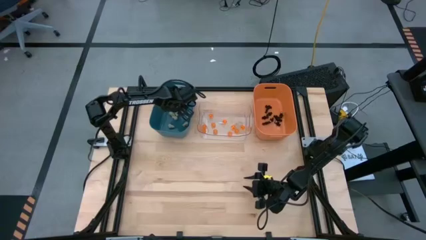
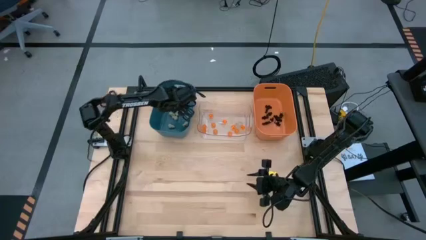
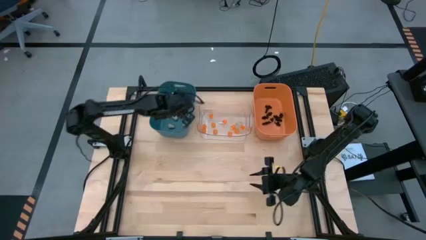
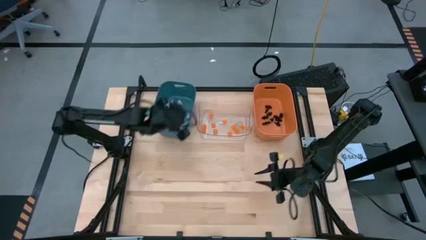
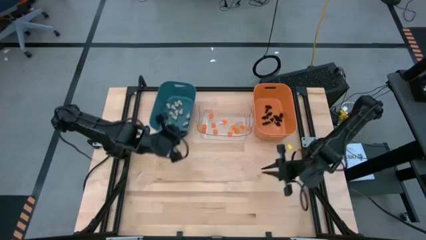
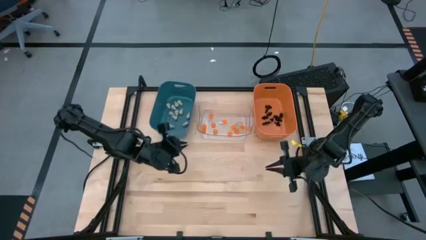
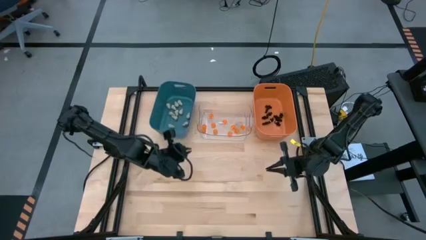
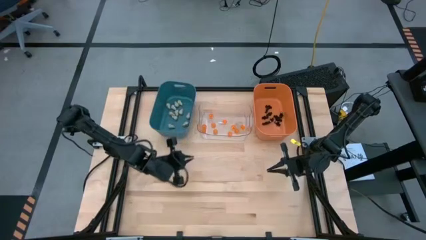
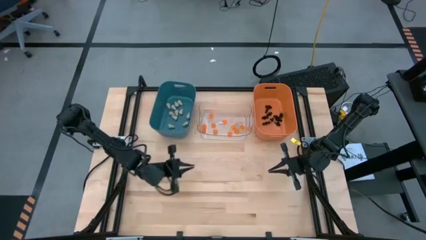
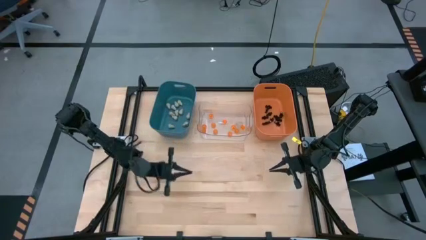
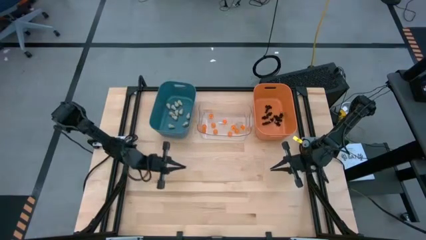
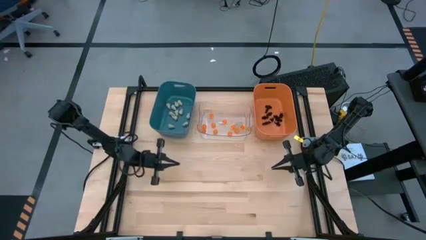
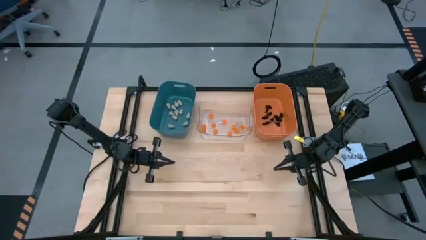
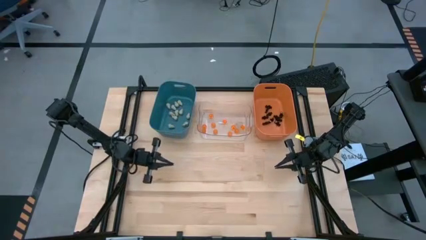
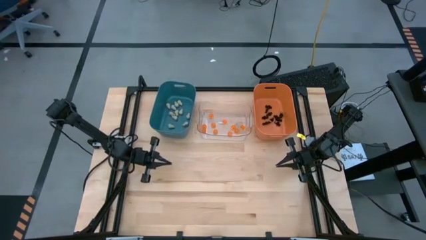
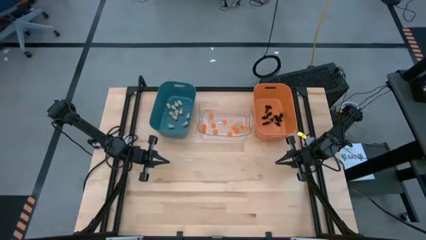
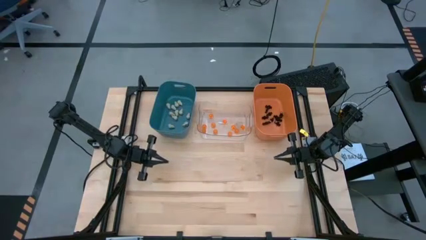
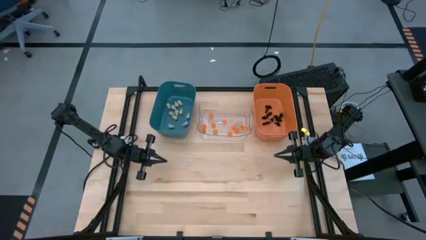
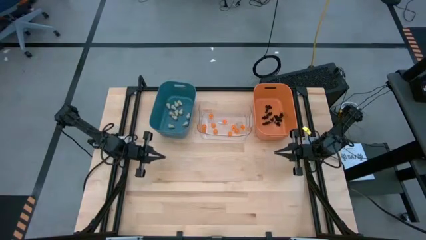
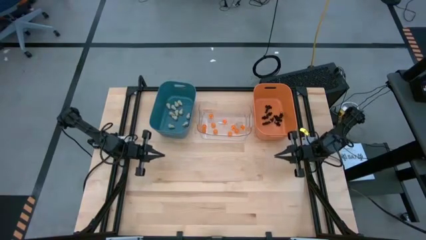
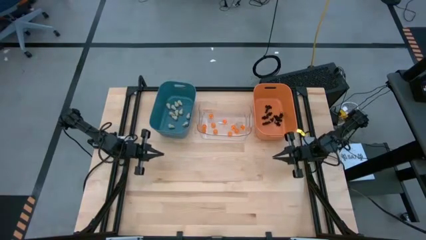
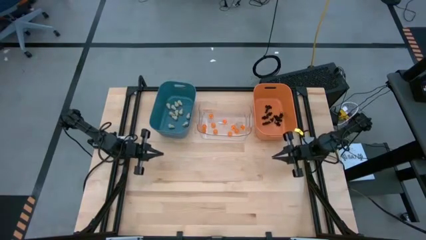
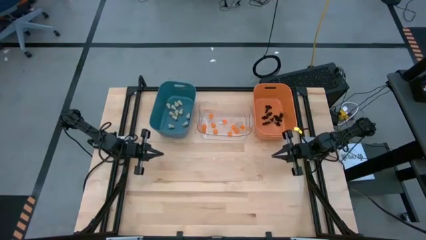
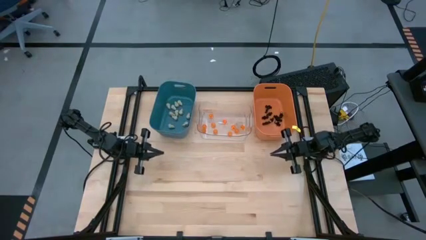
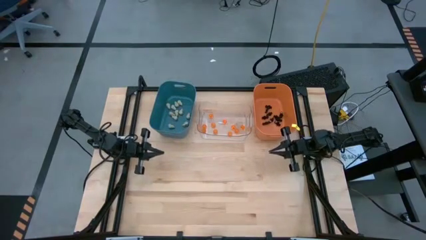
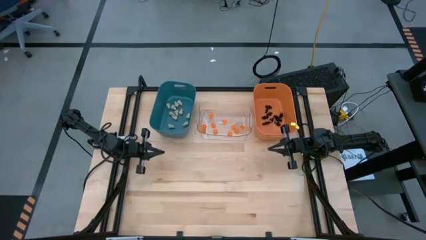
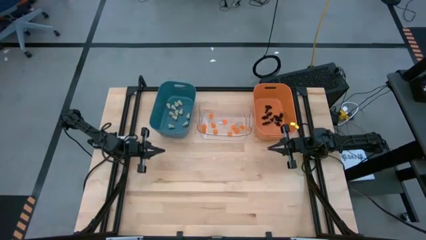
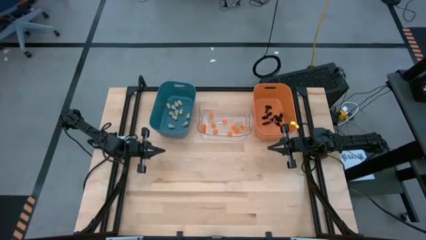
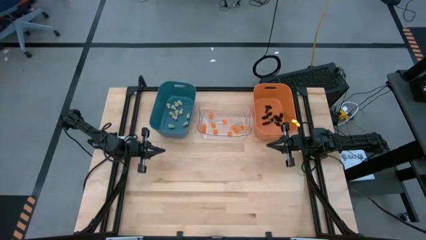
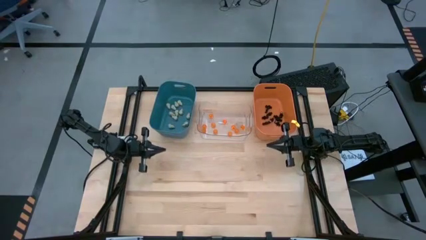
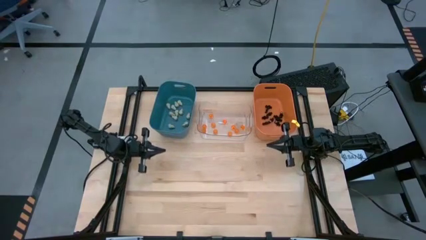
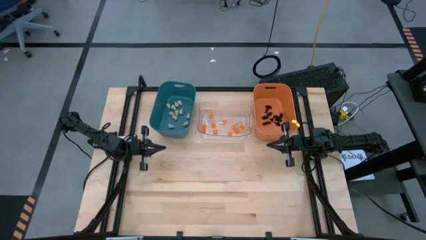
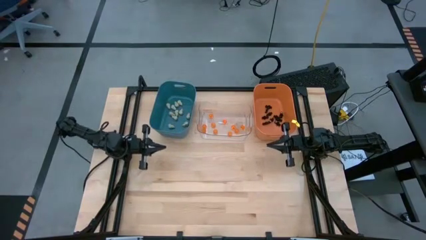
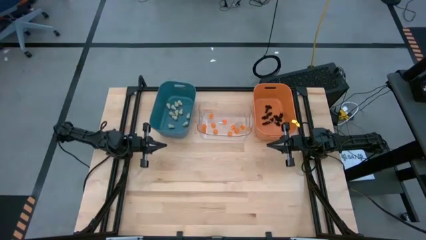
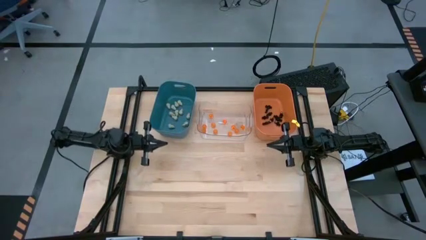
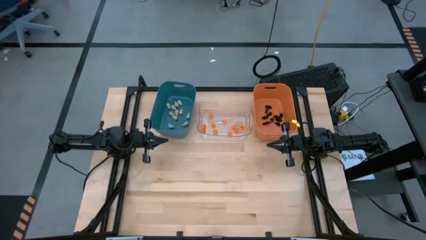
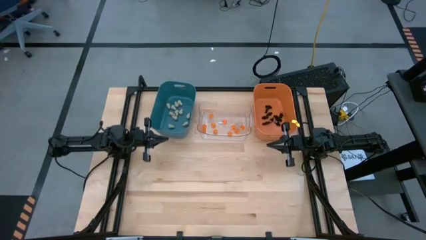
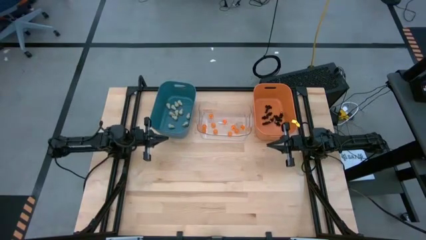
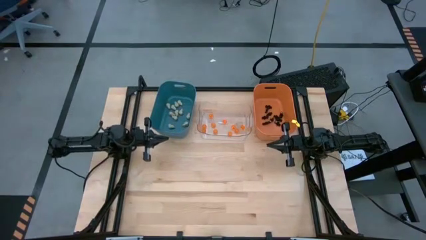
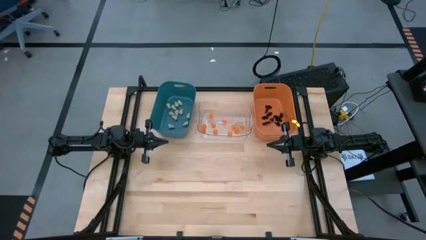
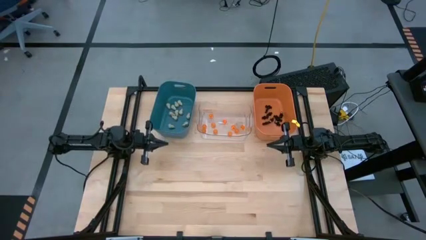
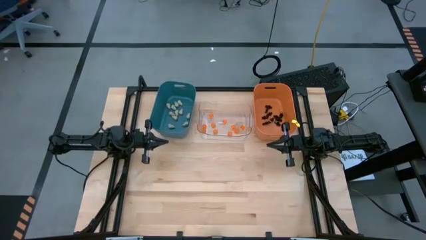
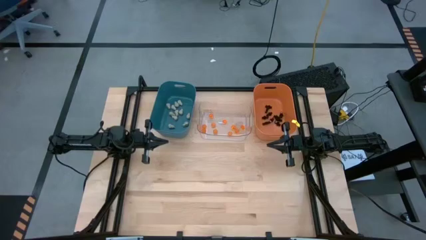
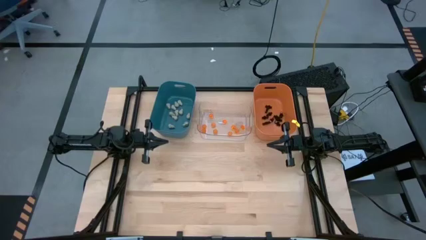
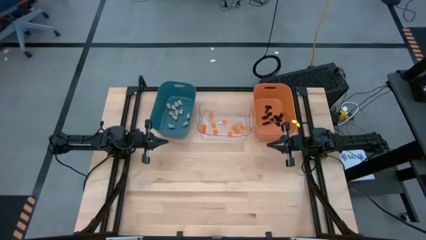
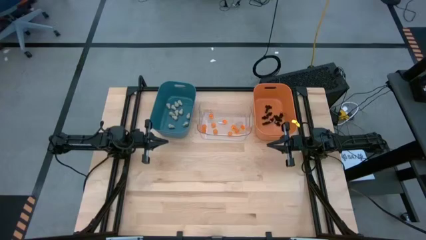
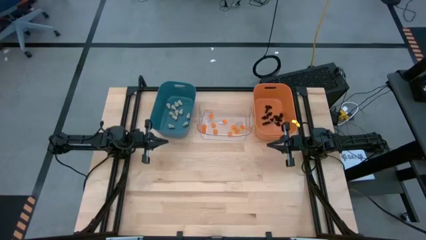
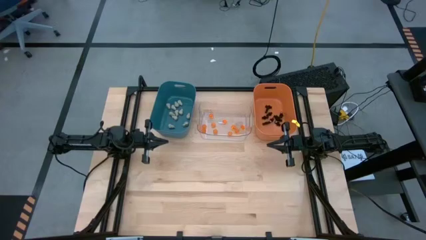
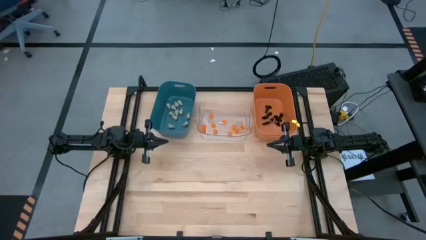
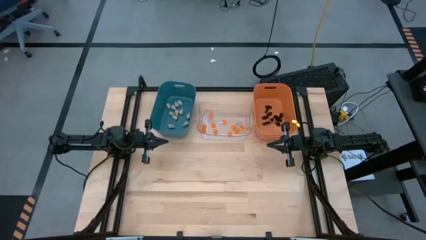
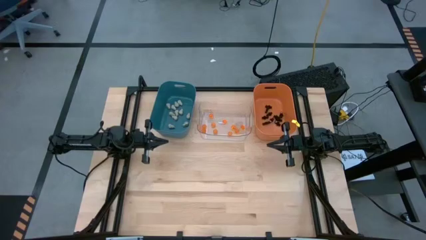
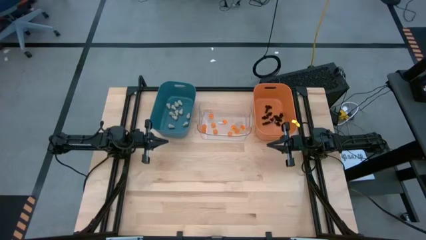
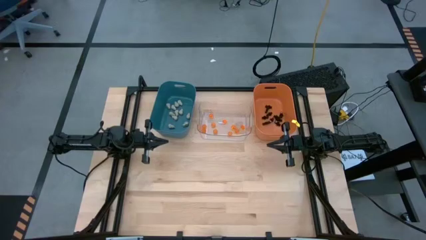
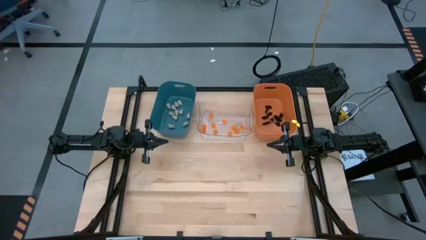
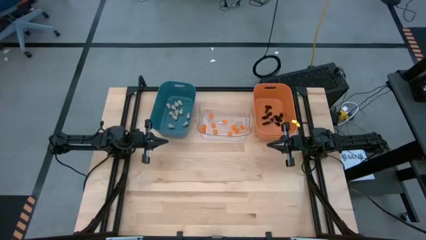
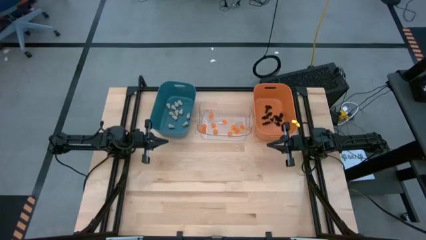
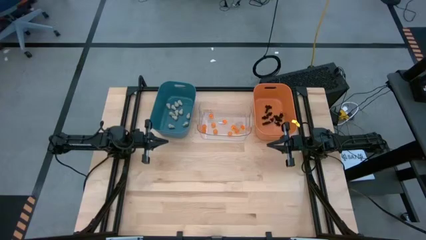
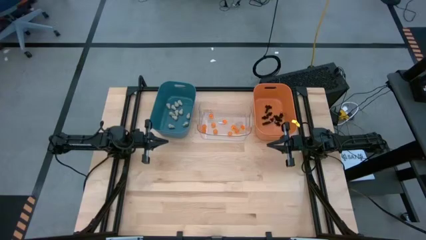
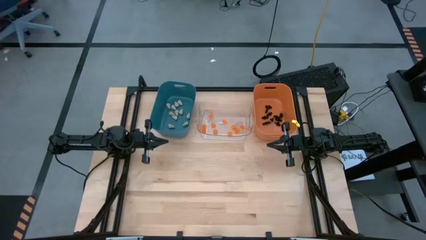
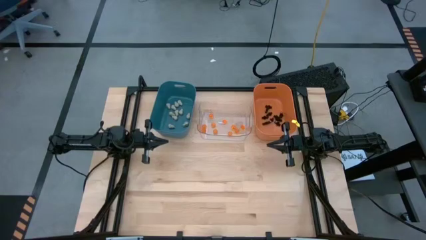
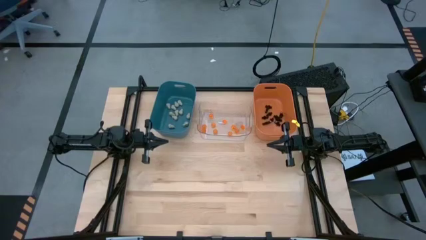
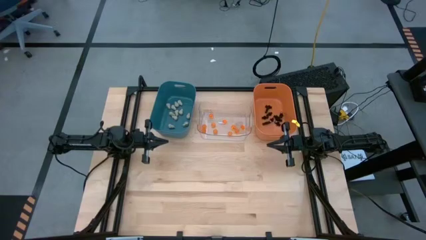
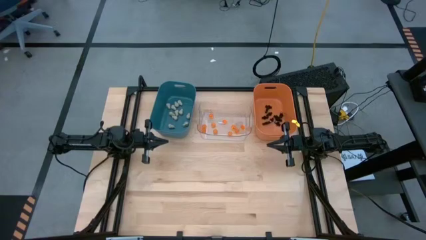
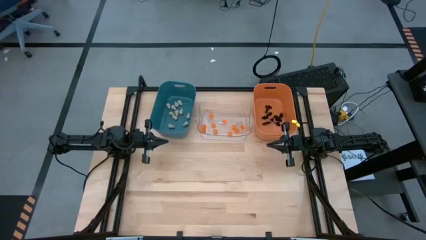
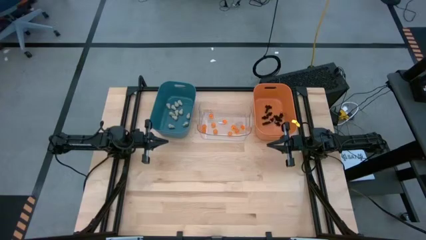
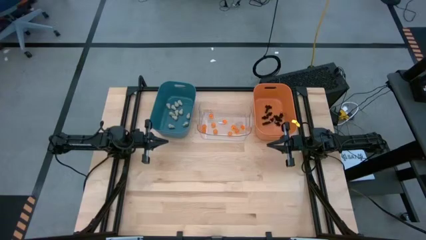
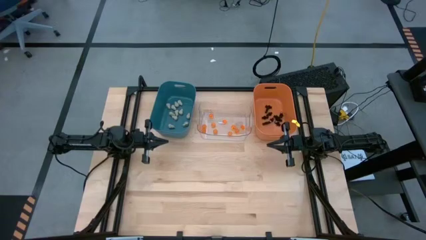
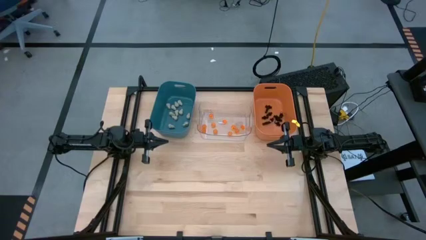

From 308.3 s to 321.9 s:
Task: Sort Halloween decoration
Return to Home Position

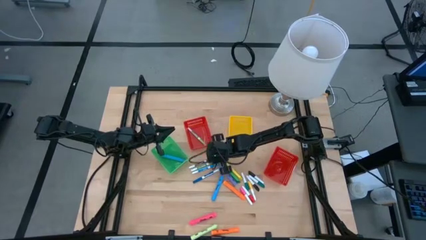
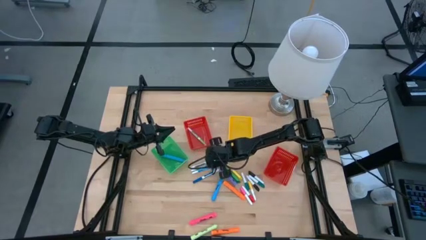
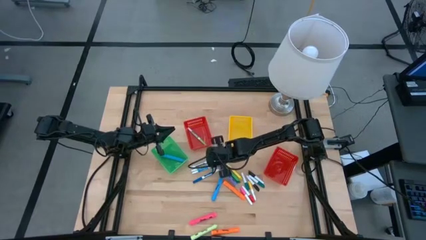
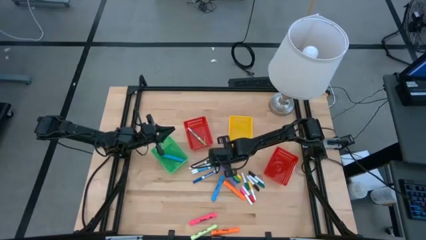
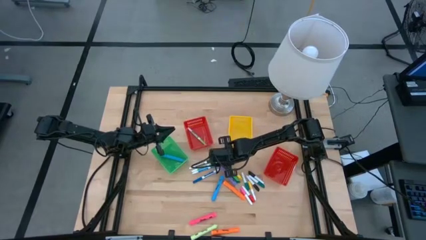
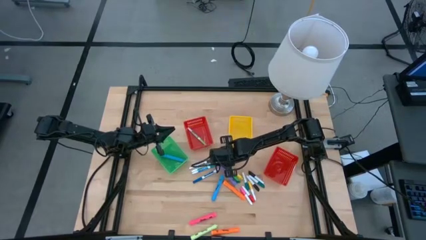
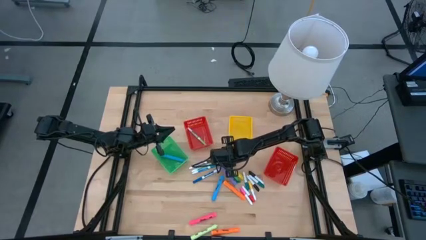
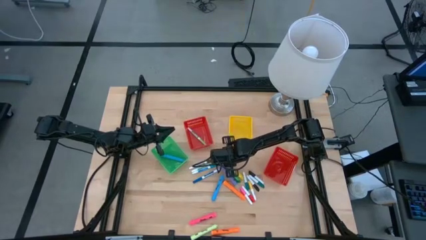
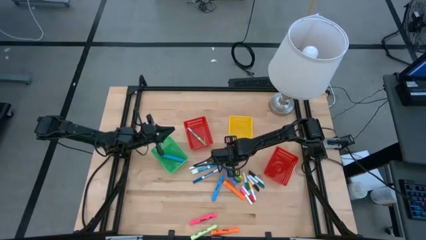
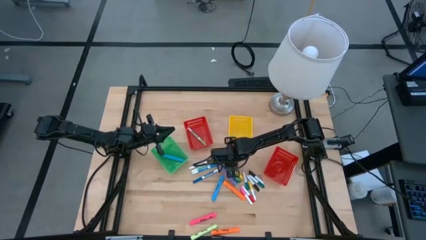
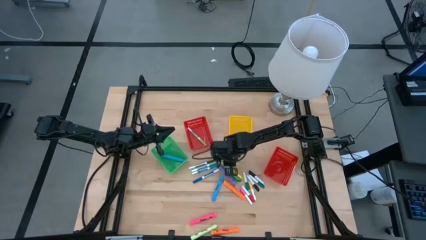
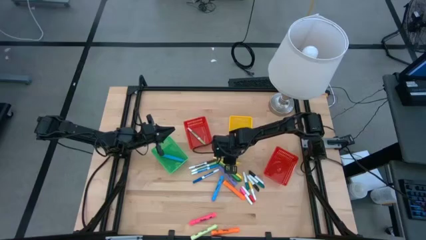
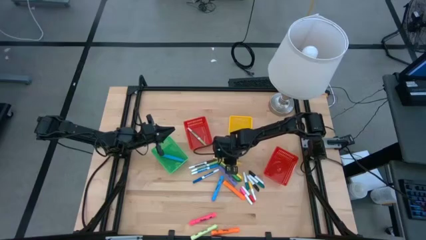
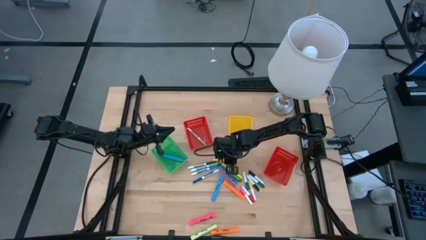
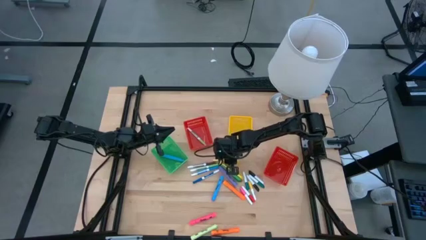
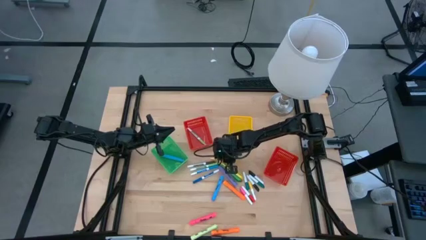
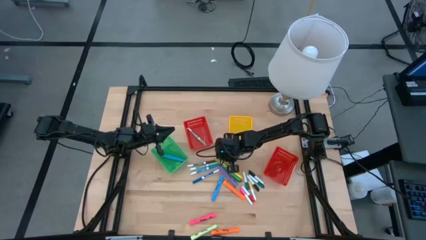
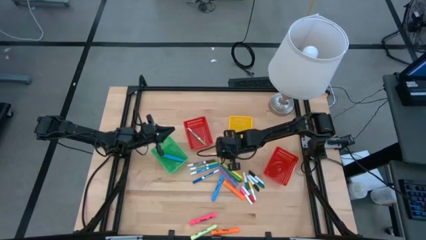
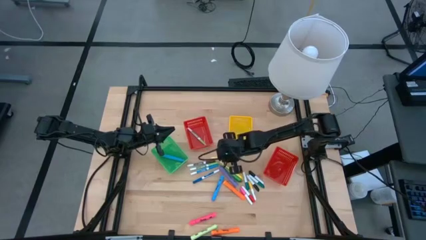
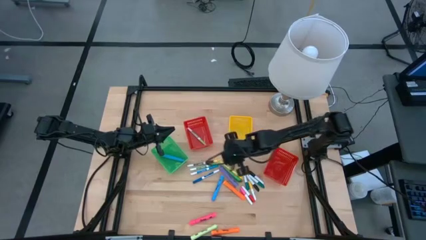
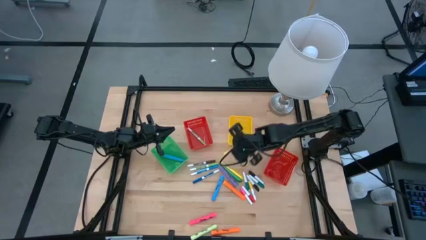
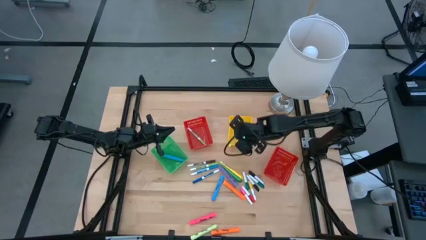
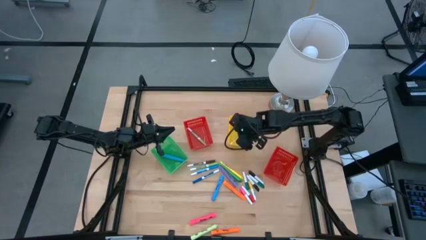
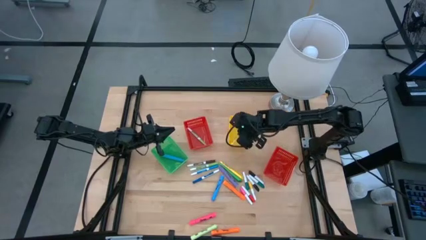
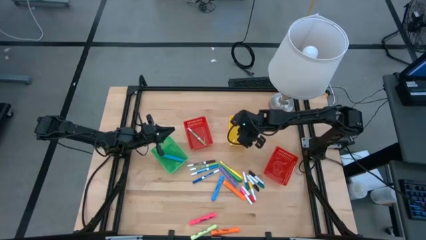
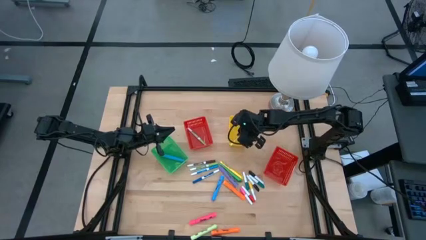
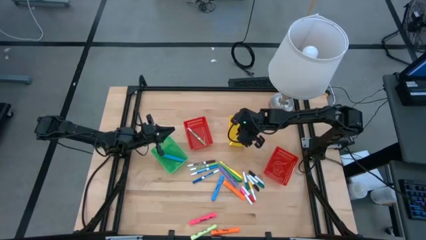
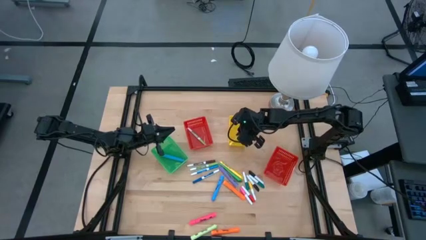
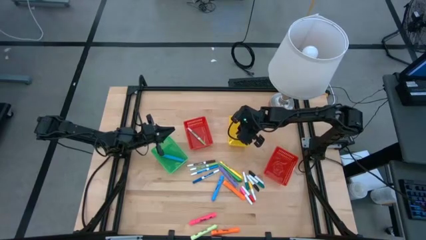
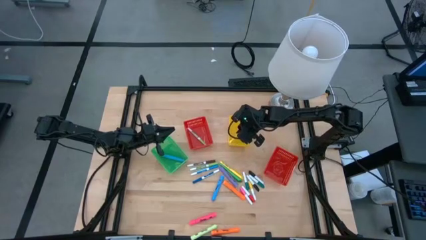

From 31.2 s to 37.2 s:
Task: Pick & Place Markers
Put the top yellow pen into the yellow bin
